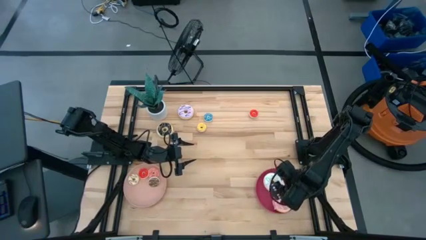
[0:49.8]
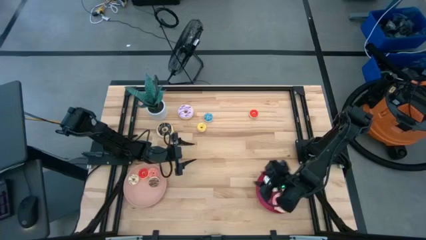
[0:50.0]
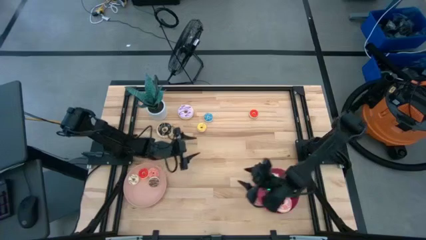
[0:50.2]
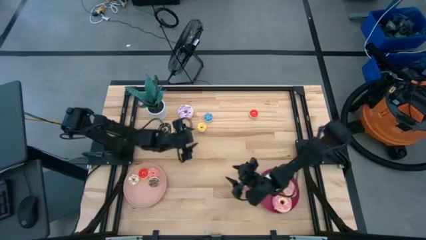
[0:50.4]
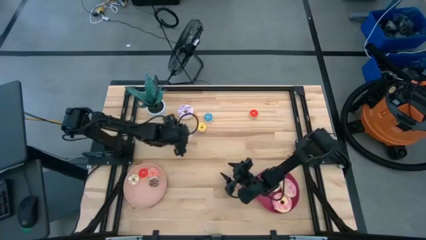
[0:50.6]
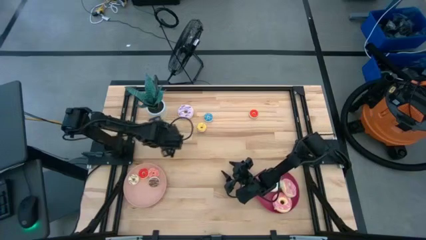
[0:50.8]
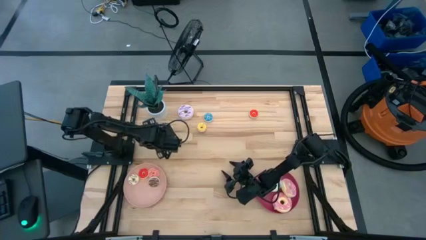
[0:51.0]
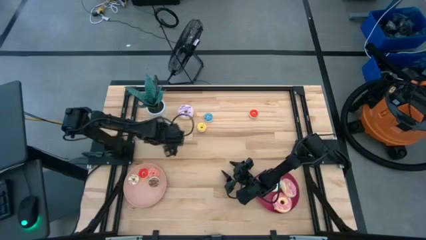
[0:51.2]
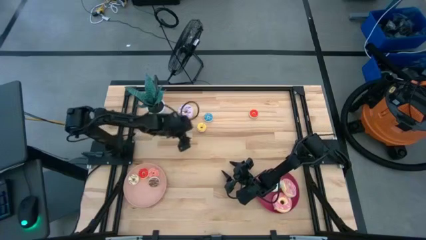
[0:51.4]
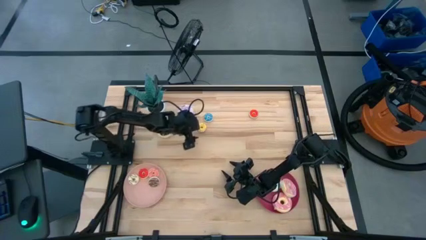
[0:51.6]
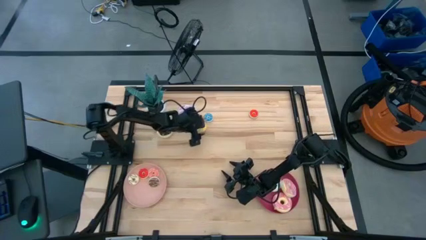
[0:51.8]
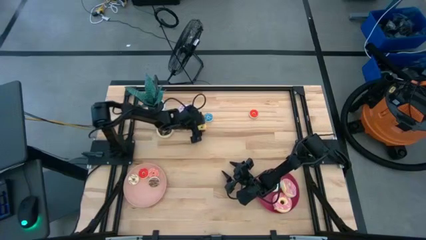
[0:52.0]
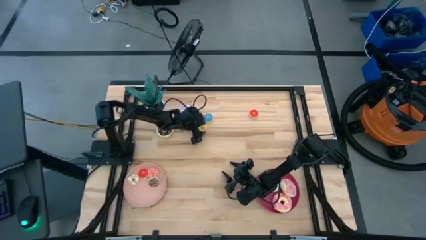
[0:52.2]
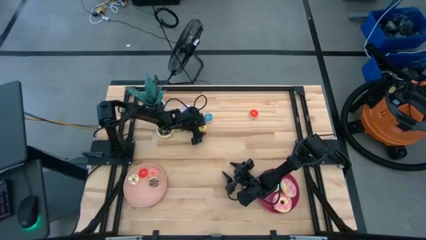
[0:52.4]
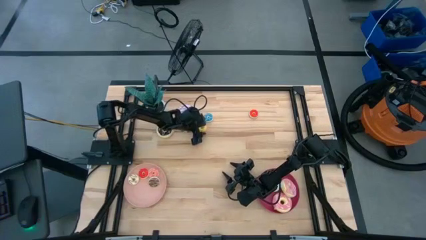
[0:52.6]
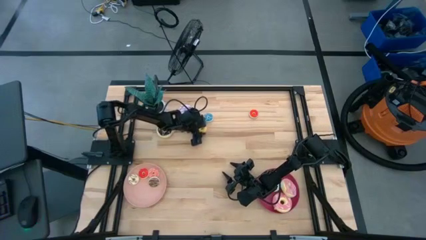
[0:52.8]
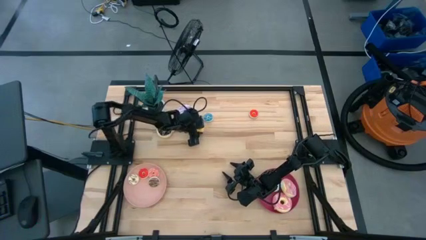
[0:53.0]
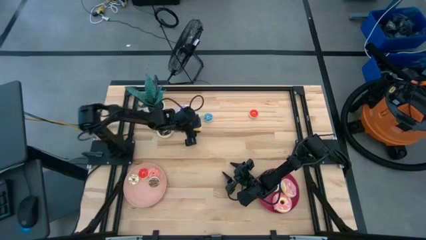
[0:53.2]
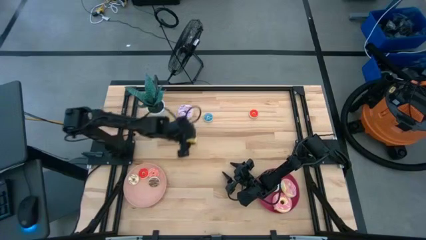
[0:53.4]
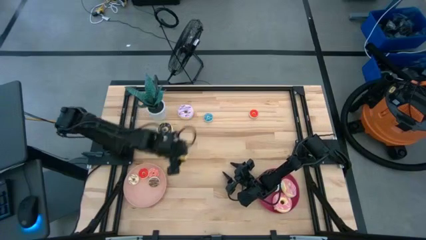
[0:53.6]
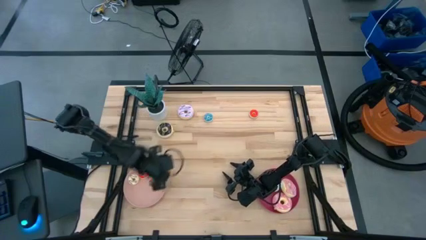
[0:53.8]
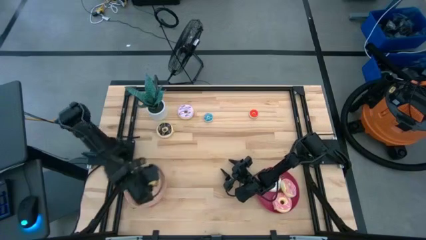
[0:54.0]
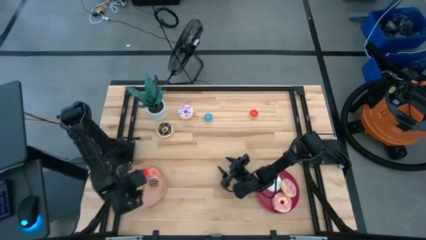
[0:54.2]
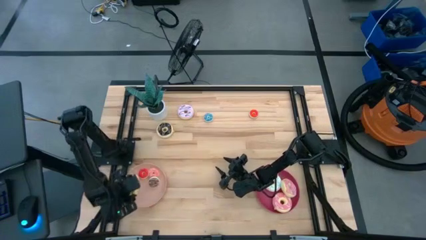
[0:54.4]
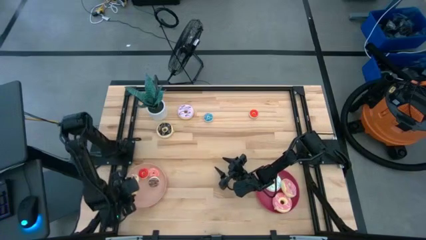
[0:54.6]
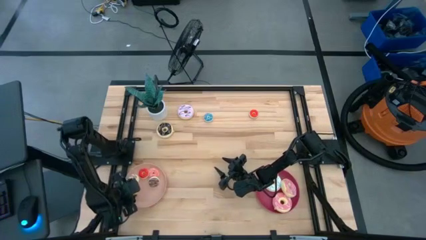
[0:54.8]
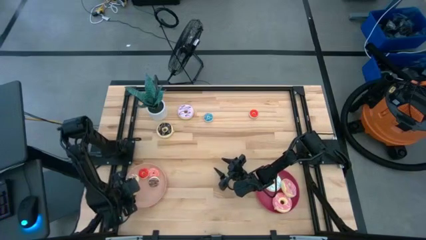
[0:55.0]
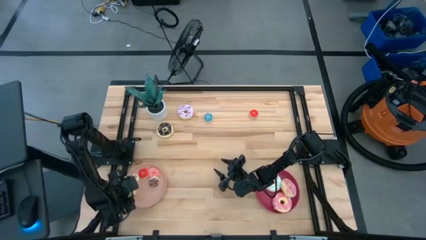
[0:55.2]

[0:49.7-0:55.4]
Task: Pick & Place donuts
Put the small yellow donut on the light pink plate

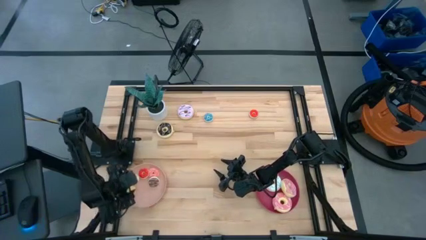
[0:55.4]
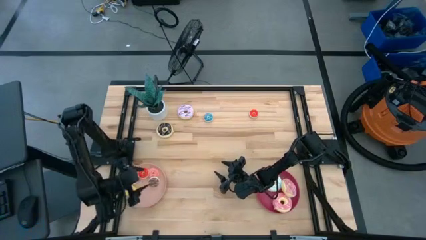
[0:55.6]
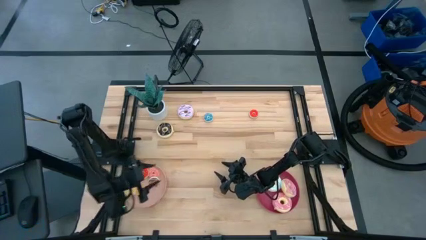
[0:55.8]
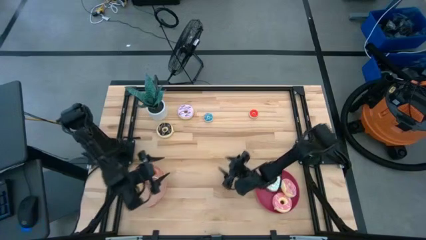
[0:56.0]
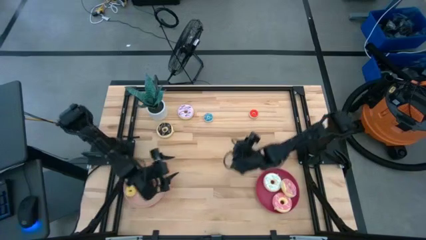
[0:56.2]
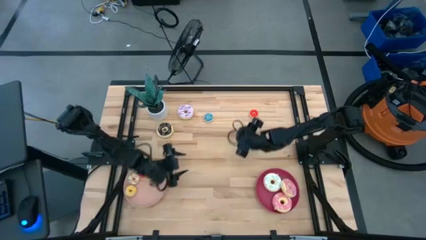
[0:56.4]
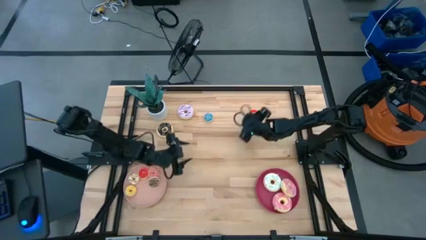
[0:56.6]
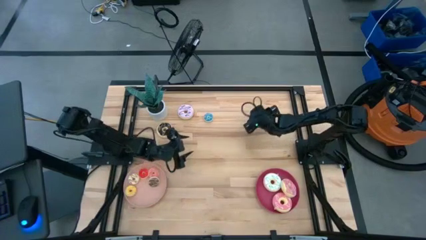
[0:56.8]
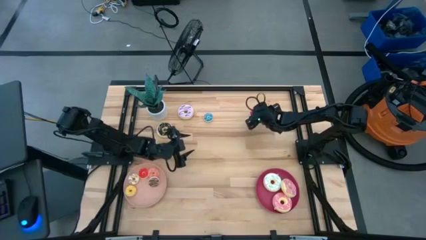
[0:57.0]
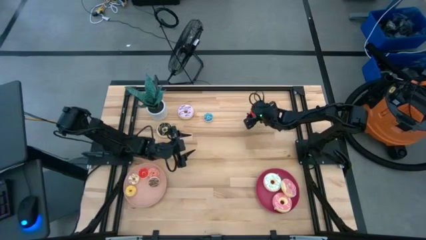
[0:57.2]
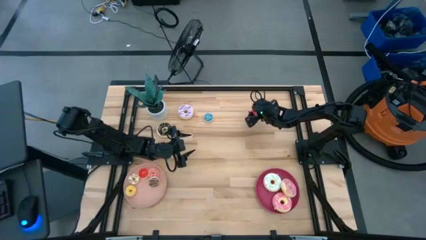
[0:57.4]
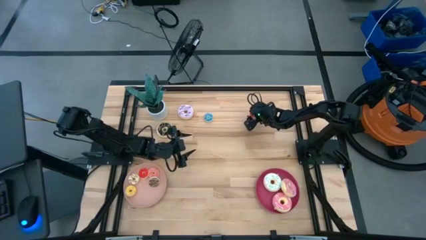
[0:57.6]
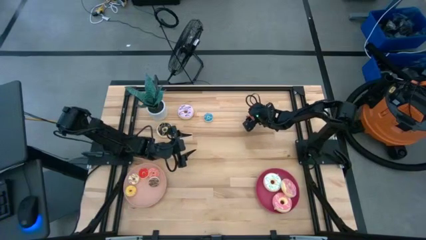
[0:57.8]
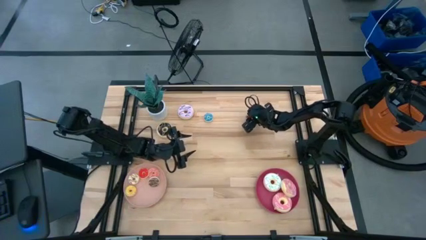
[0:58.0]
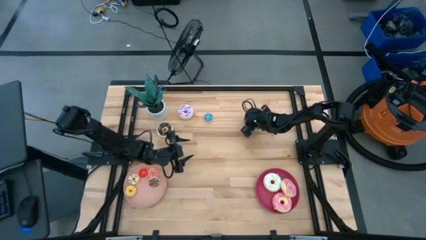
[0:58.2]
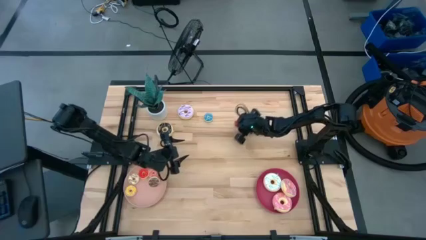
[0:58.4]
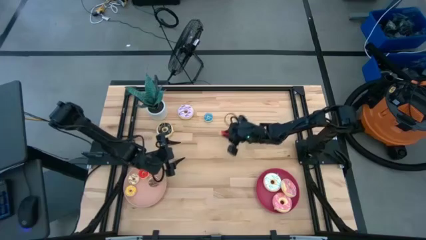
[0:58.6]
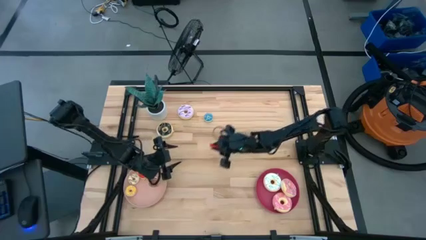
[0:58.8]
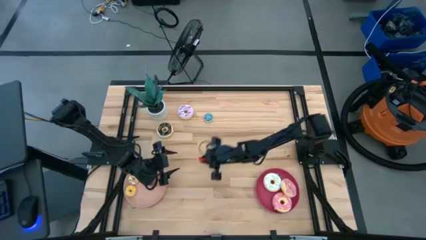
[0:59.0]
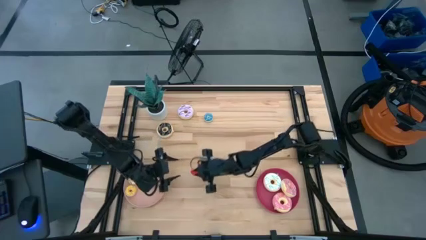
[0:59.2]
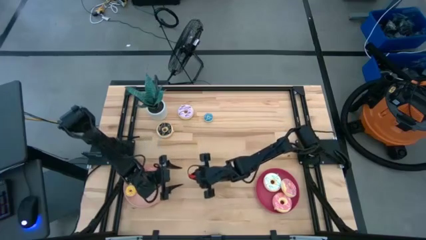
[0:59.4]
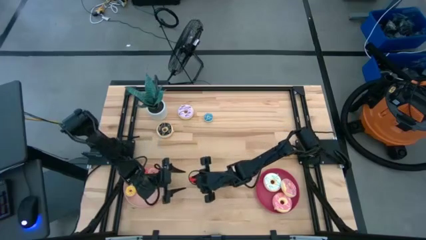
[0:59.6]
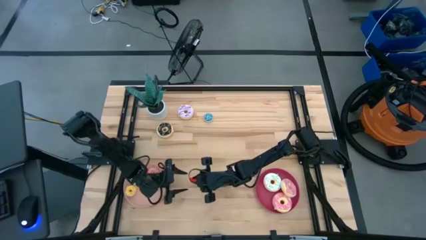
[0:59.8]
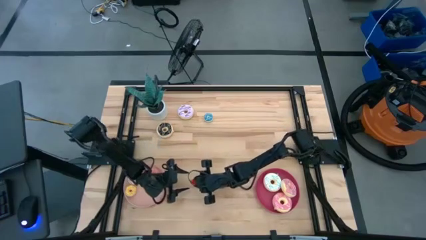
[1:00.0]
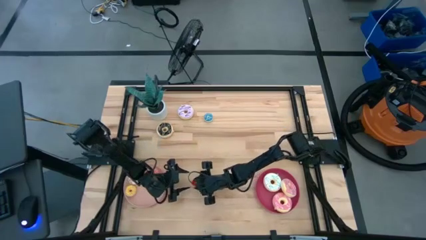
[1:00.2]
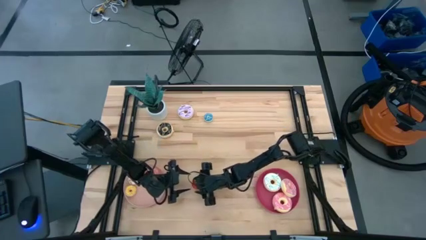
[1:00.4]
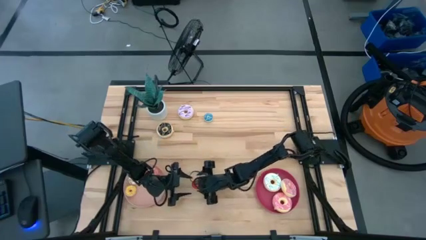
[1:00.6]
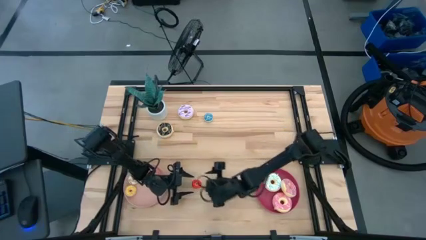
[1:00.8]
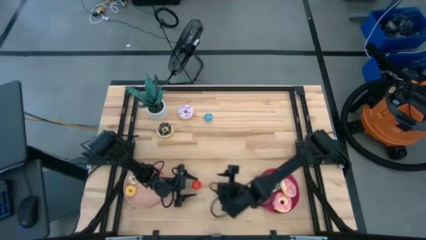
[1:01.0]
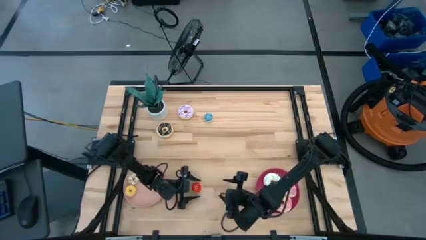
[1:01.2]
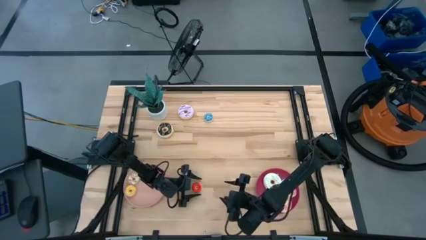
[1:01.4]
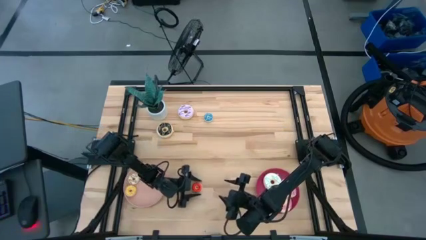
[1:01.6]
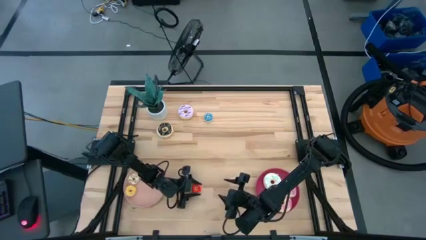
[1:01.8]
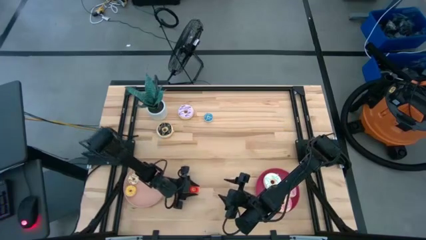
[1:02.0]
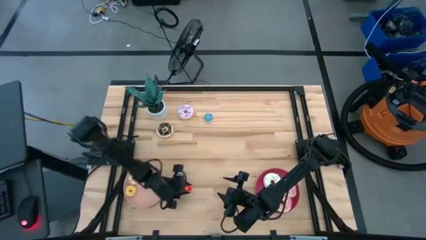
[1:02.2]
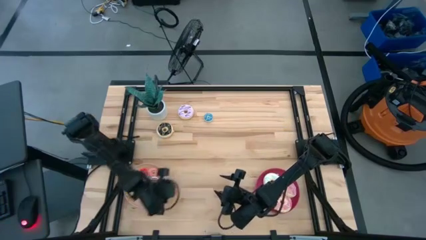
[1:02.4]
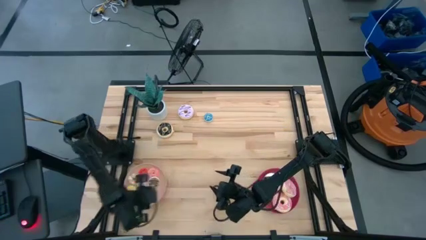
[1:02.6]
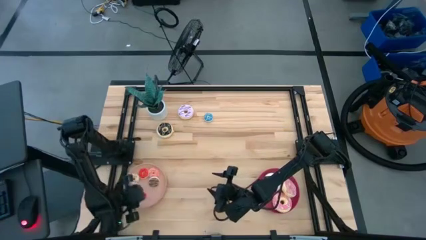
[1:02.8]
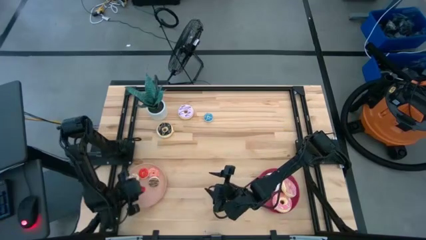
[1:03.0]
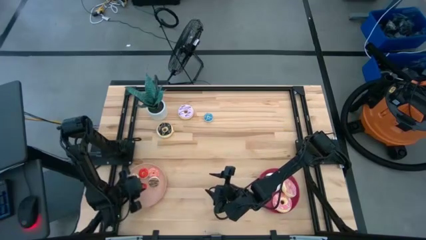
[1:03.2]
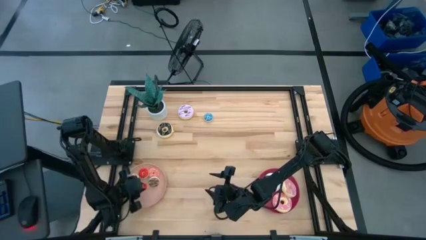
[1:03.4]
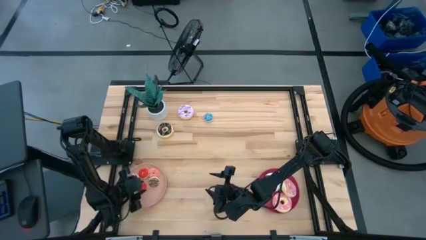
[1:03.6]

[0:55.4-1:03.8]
Put the small red donut on the light pink plate

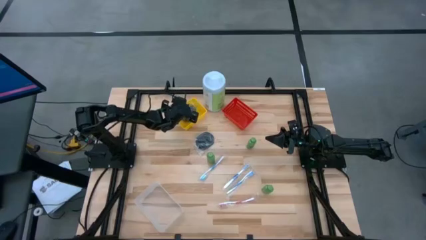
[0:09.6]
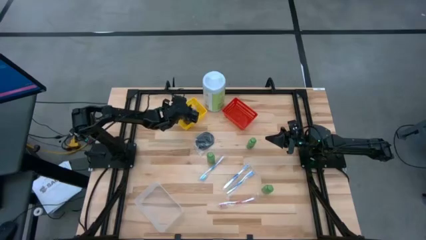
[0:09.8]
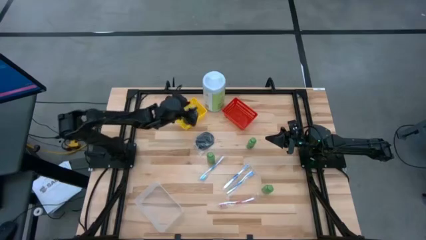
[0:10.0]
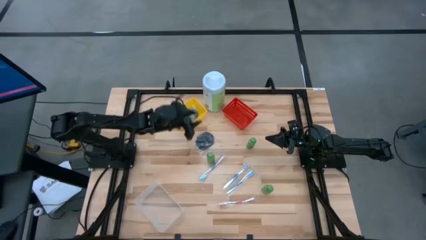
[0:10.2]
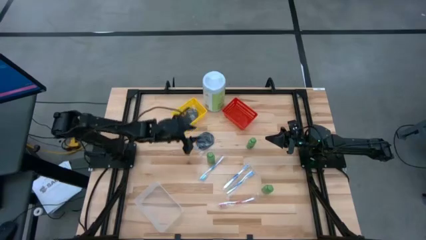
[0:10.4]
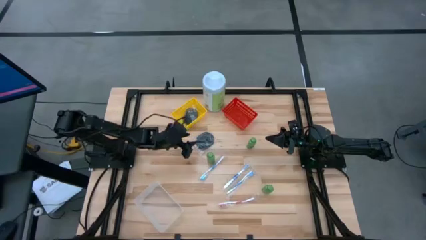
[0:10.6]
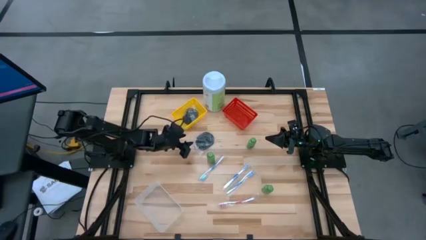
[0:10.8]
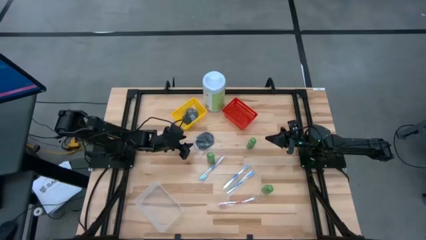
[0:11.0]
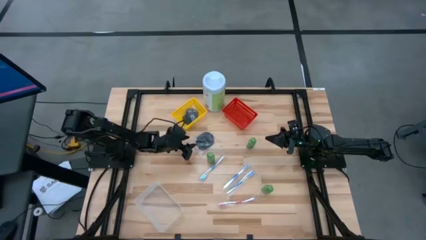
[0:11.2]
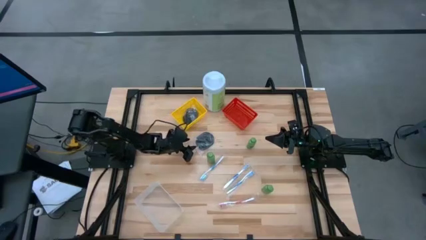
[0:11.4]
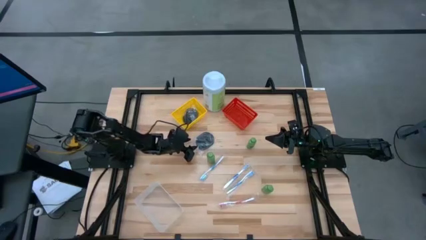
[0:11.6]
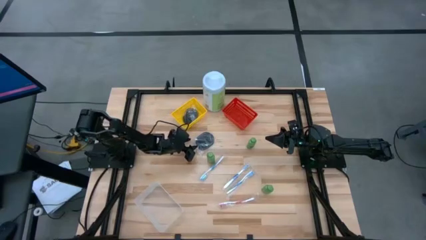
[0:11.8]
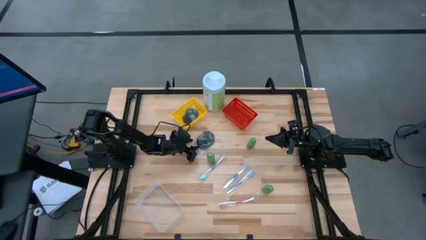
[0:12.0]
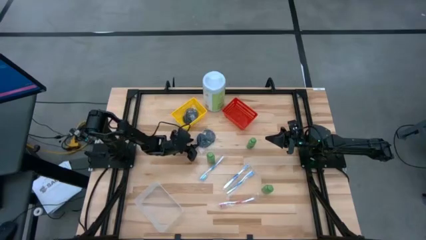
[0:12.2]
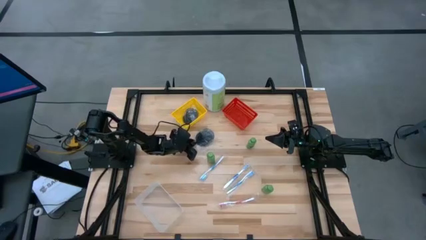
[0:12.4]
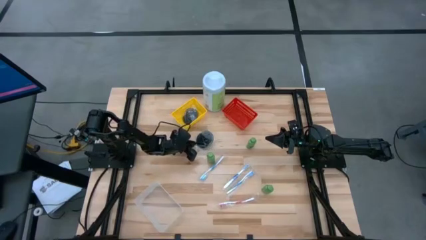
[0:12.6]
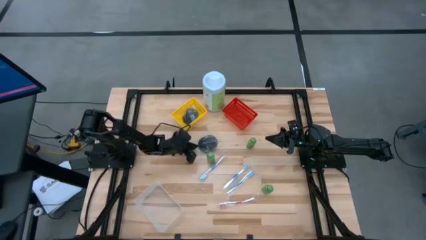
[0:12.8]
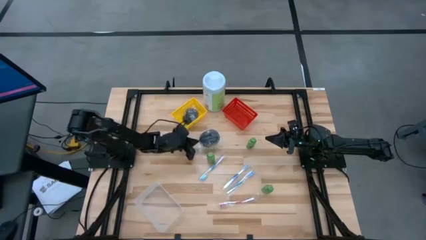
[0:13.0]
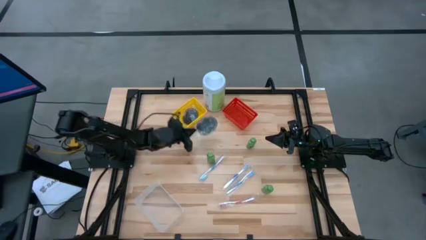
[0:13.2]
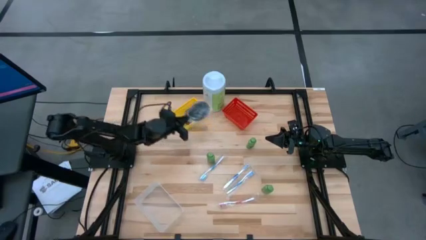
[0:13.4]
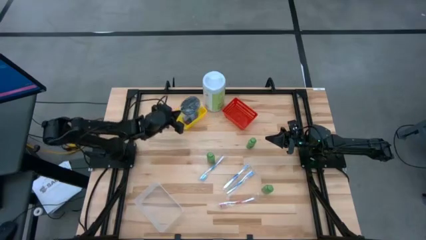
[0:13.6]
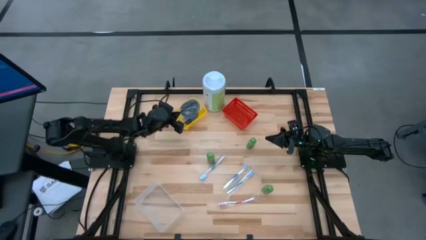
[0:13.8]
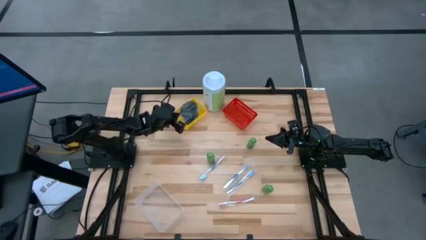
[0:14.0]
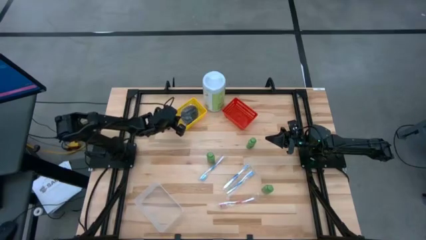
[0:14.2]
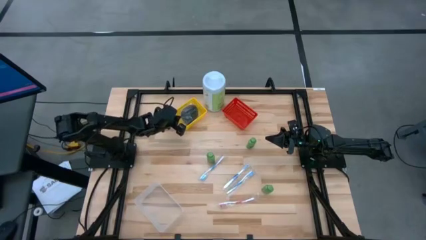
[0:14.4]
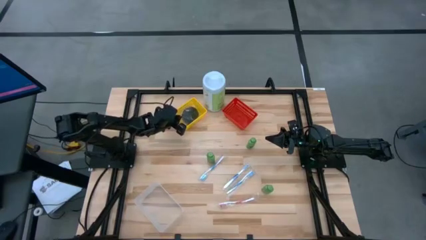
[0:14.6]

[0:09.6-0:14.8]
Task: Pick & Place Travel size toiletries
Put the black hairbrush into the yellow bin
